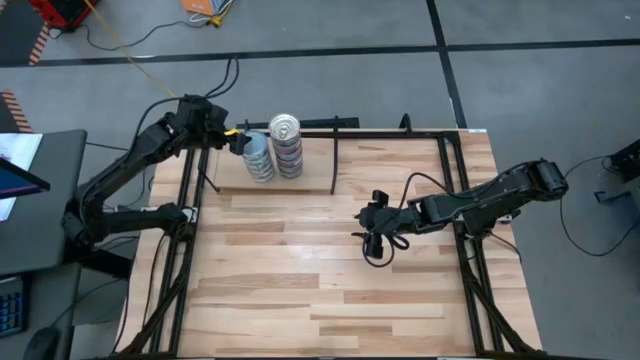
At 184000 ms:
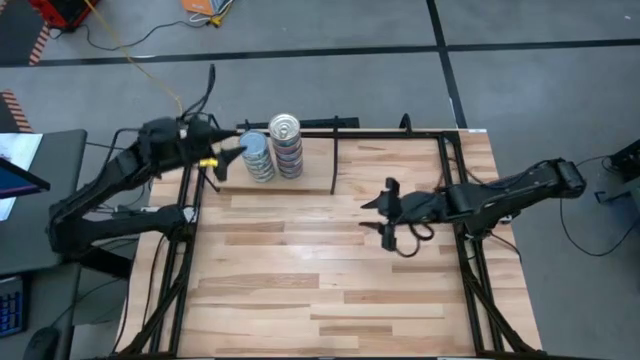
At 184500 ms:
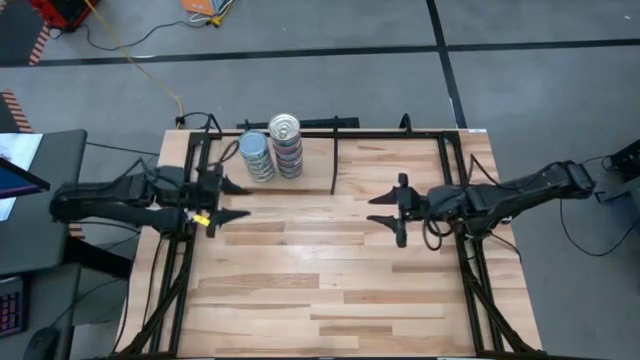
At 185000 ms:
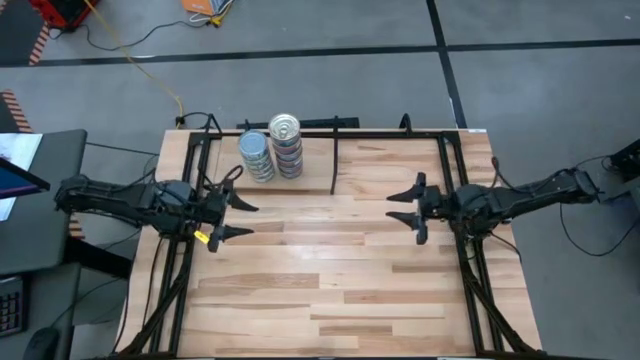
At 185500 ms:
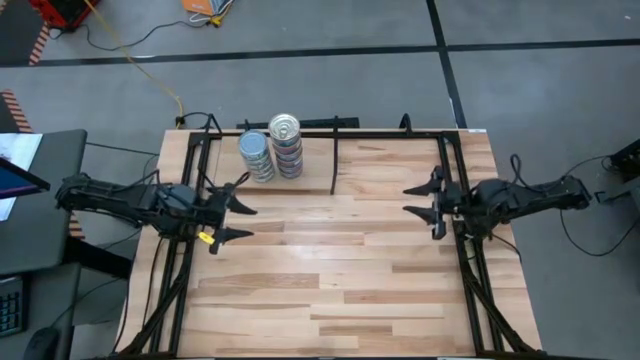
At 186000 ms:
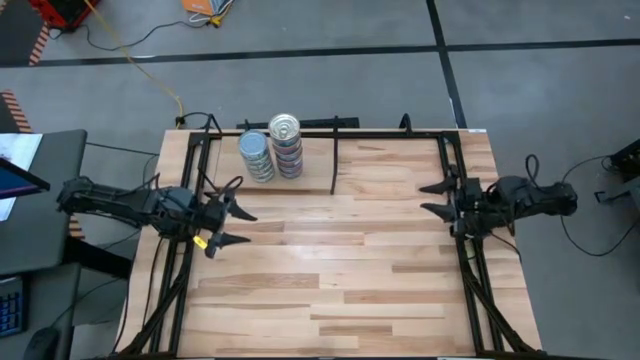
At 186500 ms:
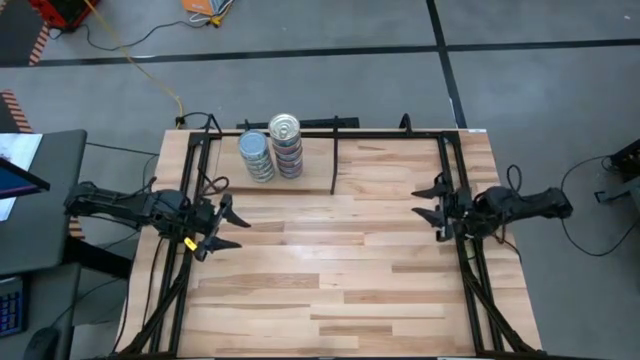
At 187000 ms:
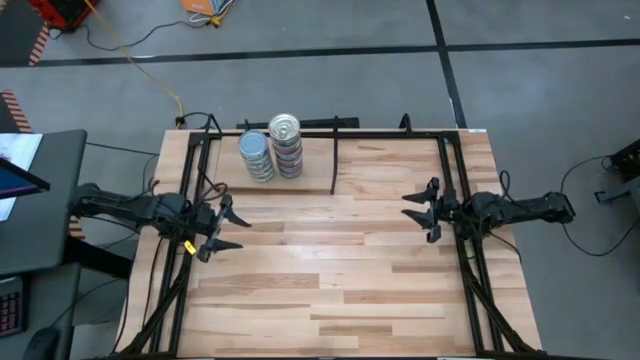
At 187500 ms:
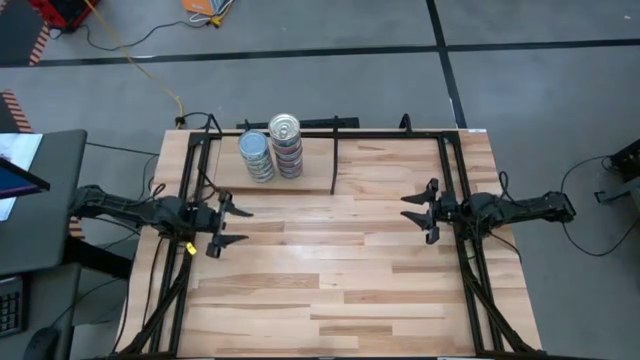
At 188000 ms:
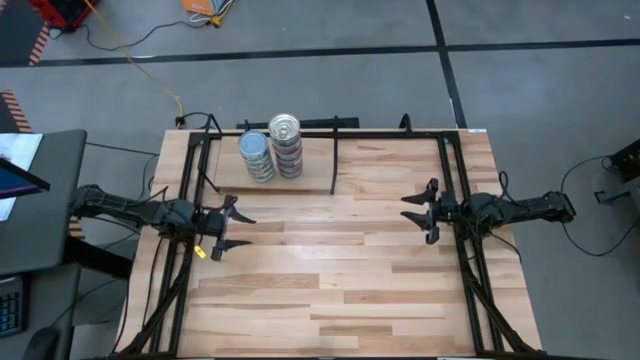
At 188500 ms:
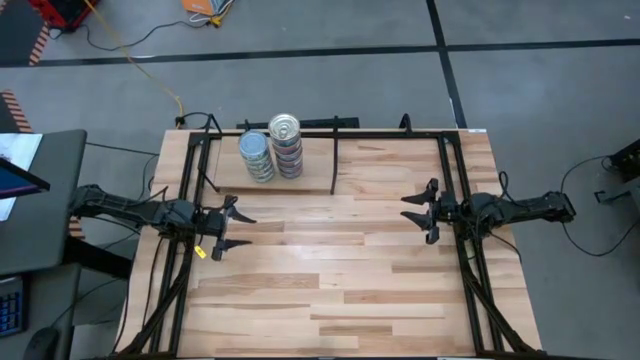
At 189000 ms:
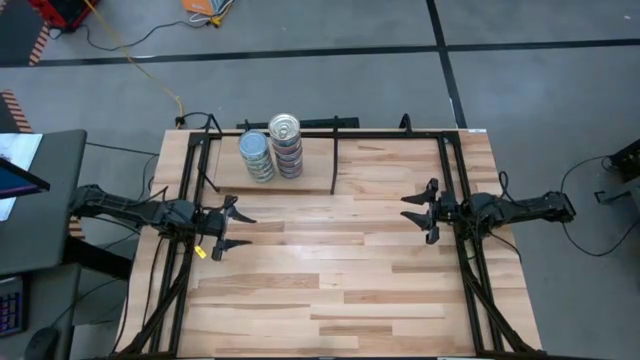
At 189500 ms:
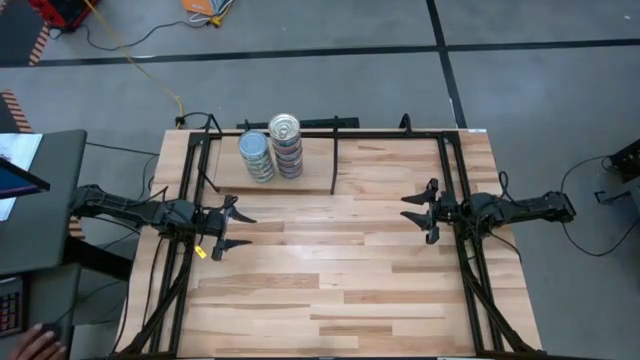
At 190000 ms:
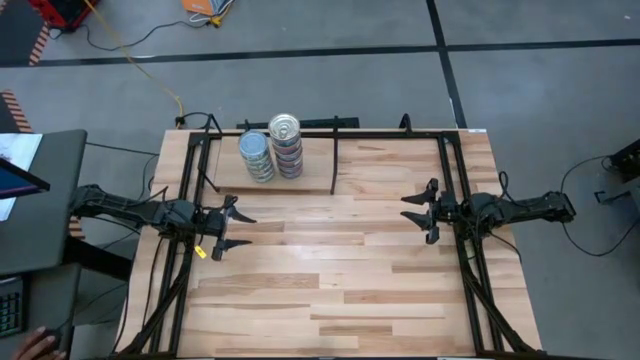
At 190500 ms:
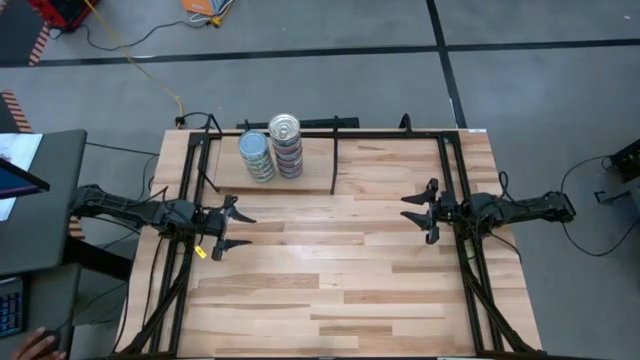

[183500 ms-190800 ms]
Task: Stack canned seafood by type on shelf
Return to Home Position

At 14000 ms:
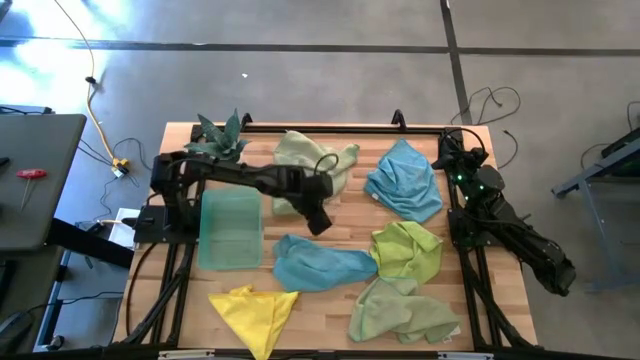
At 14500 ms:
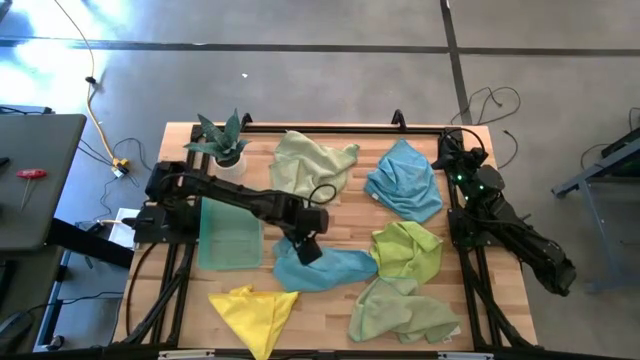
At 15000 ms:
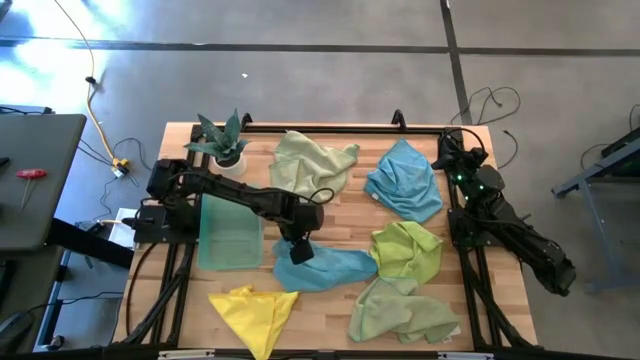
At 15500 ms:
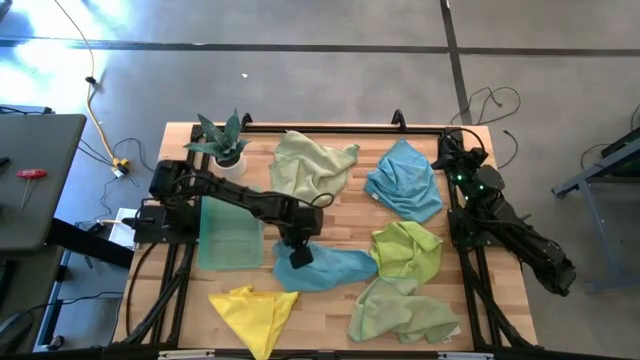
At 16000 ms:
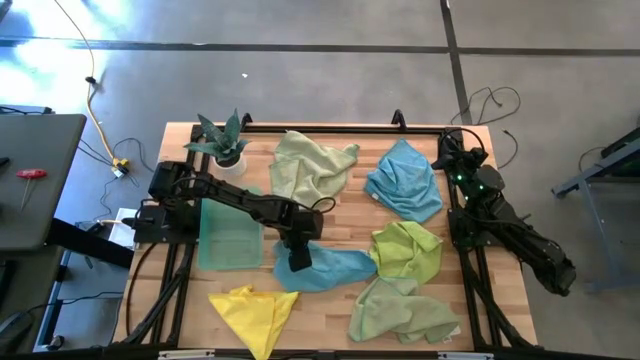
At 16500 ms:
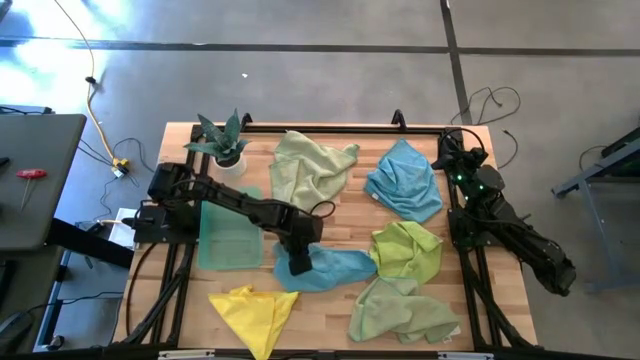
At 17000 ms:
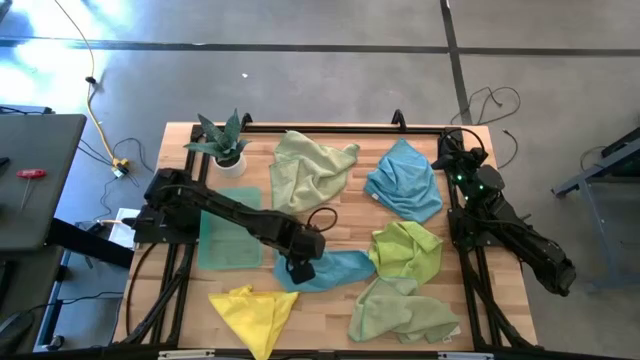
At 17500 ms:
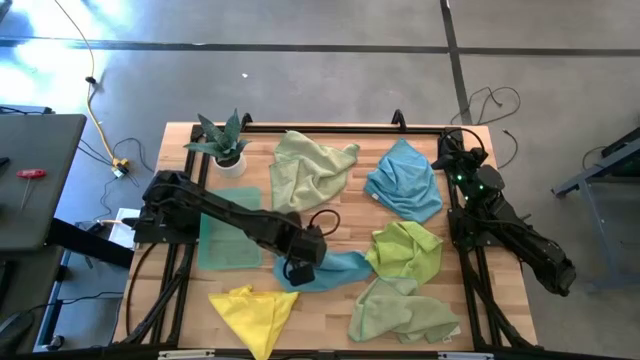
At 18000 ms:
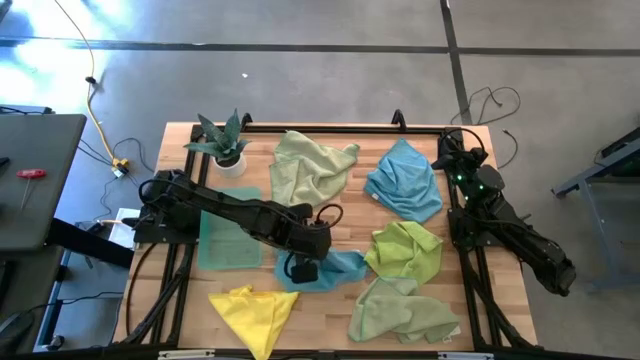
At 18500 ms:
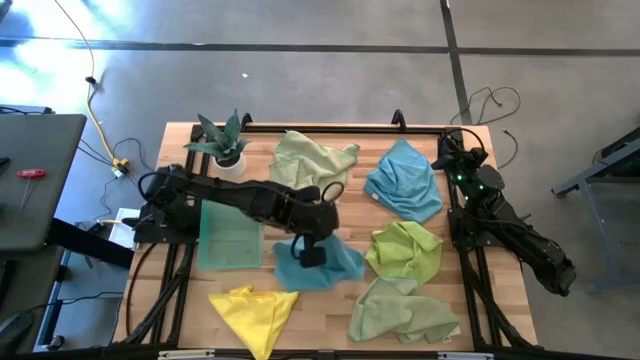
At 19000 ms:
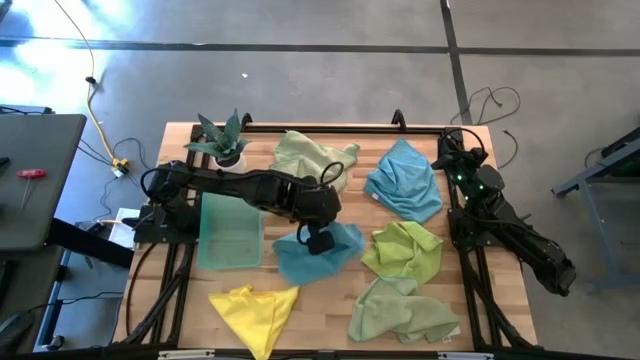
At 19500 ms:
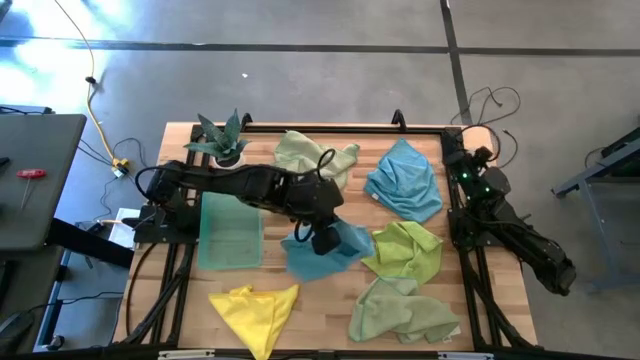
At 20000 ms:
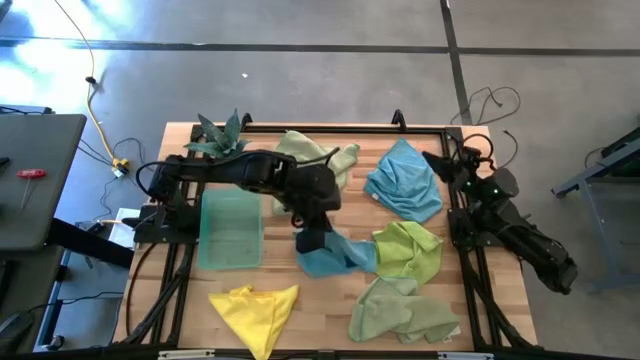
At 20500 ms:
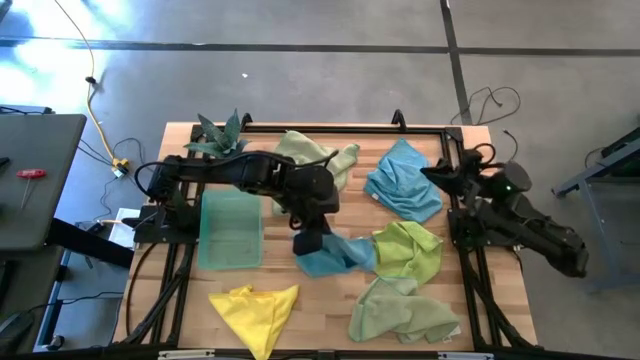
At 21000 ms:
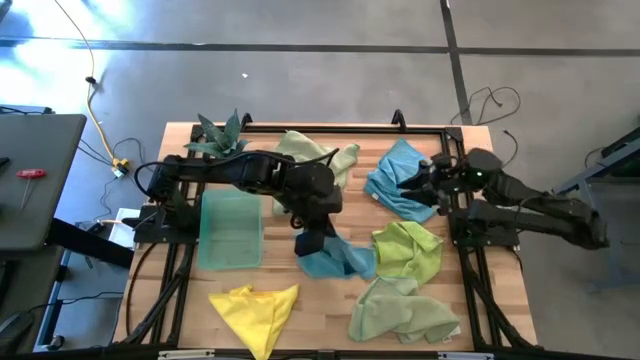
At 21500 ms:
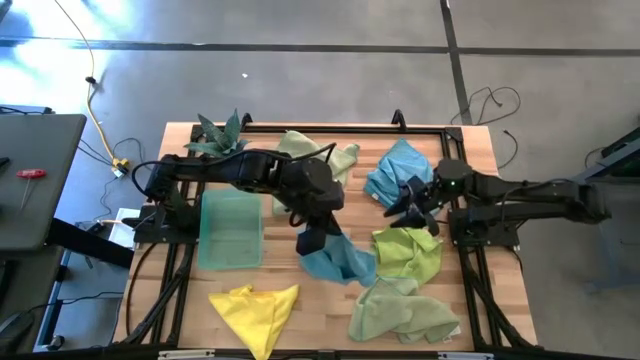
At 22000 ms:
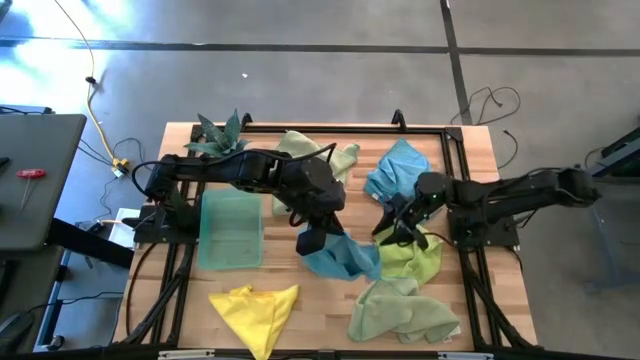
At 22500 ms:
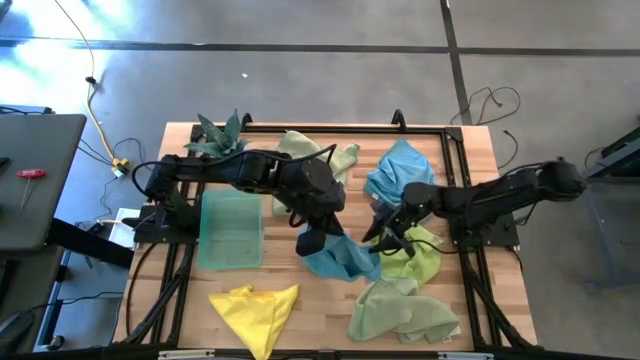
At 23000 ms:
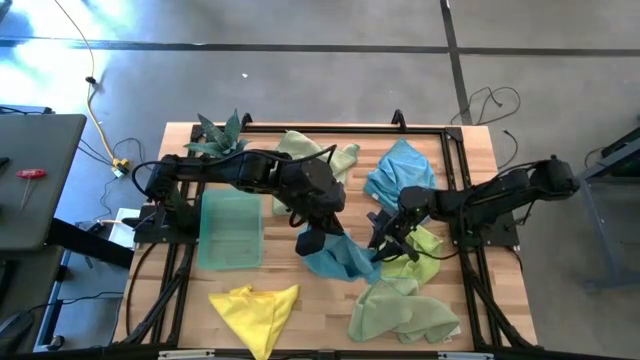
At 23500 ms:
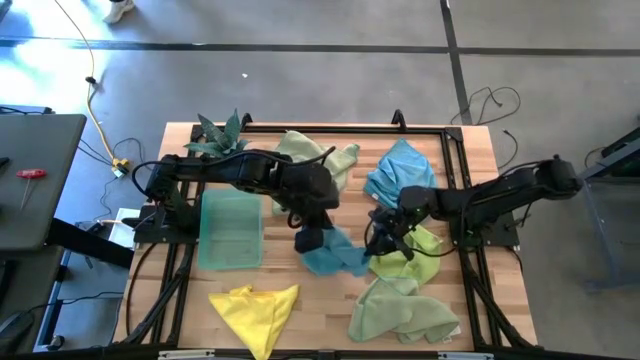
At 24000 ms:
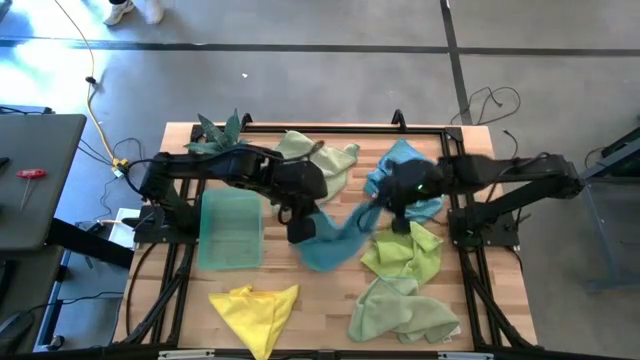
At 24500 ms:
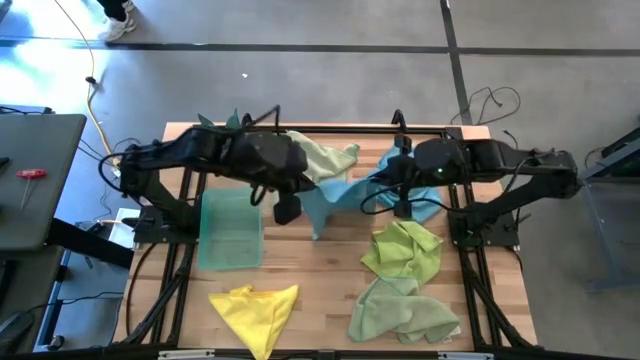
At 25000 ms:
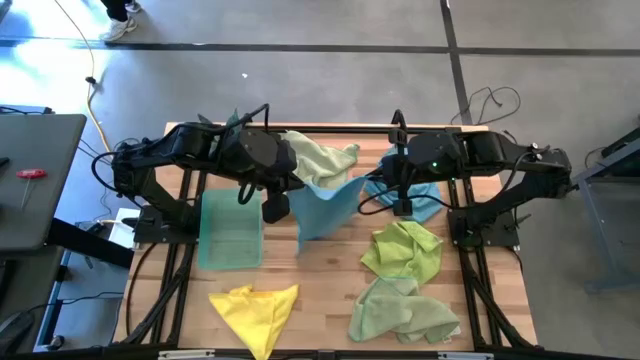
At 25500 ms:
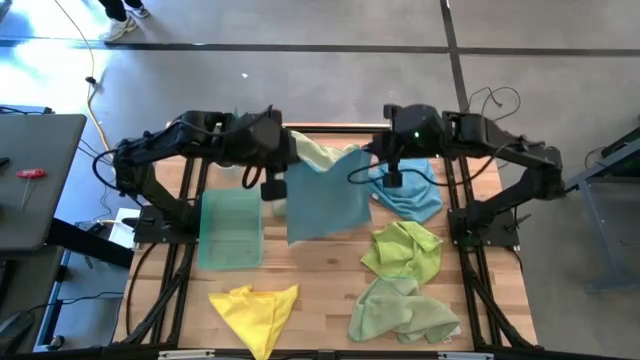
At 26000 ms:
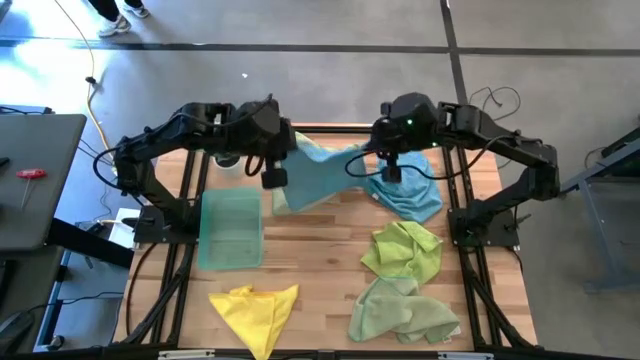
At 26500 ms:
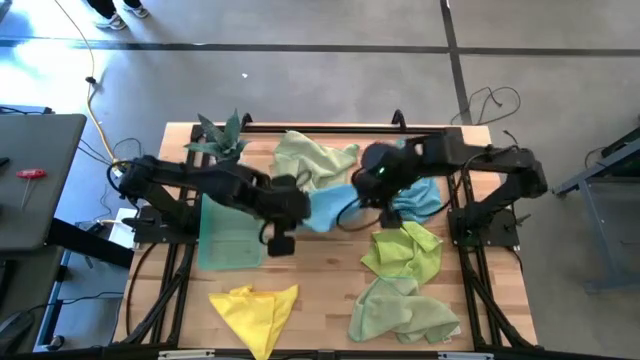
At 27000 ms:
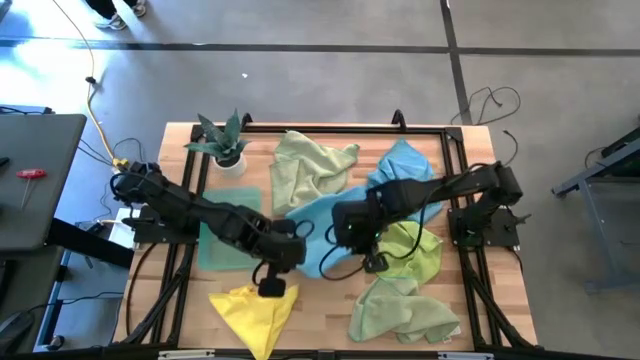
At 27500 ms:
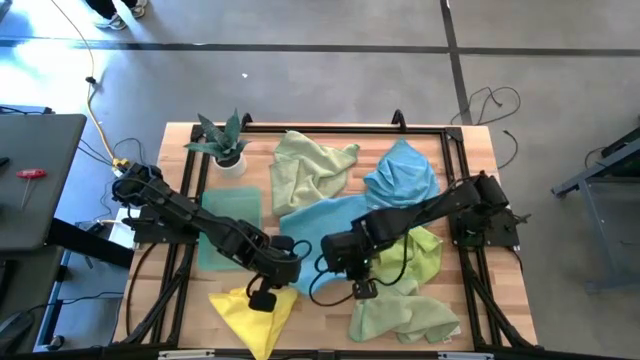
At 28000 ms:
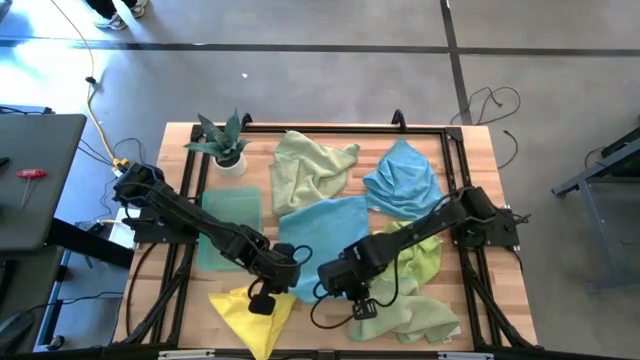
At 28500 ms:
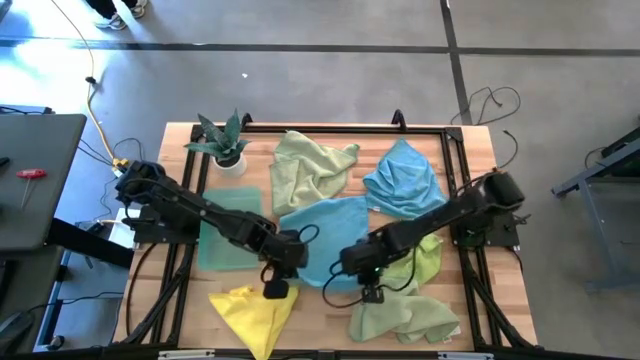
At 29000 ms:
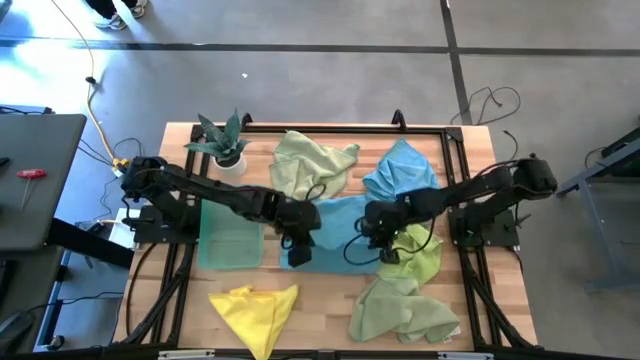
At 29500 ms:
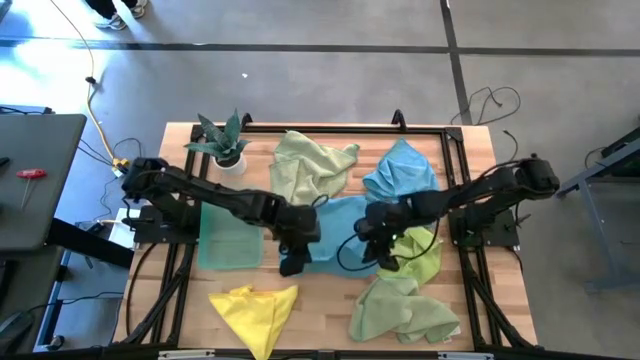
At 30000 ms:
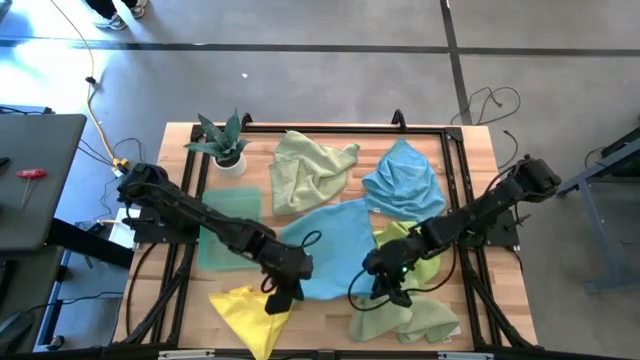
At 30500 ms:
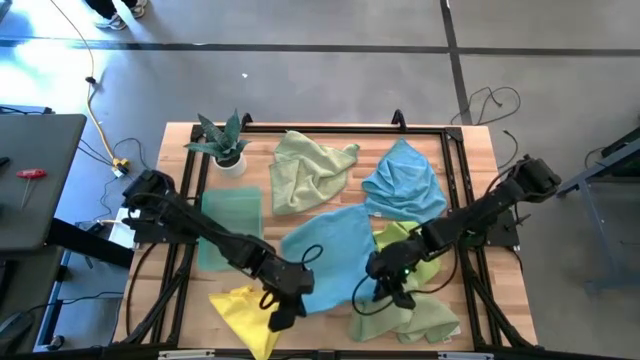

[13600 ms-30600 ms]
Task: Fold microfiber towels
Fold the bottom blue microfiber towel
